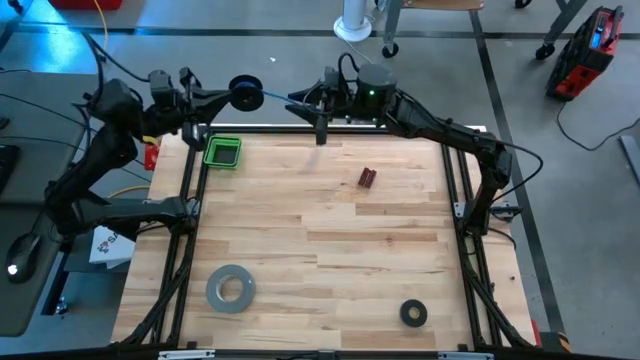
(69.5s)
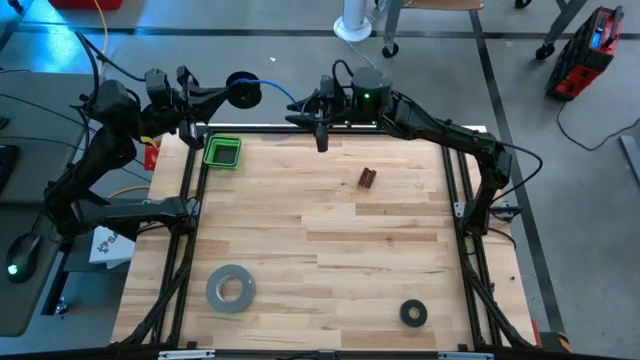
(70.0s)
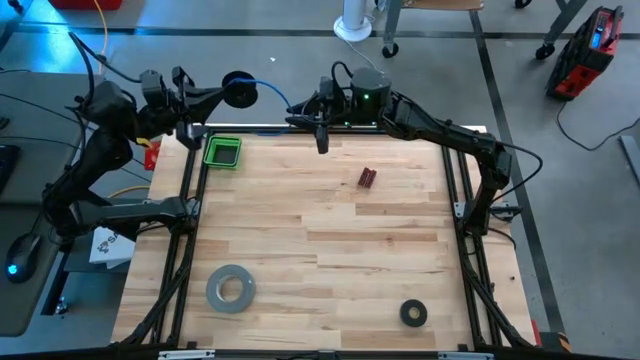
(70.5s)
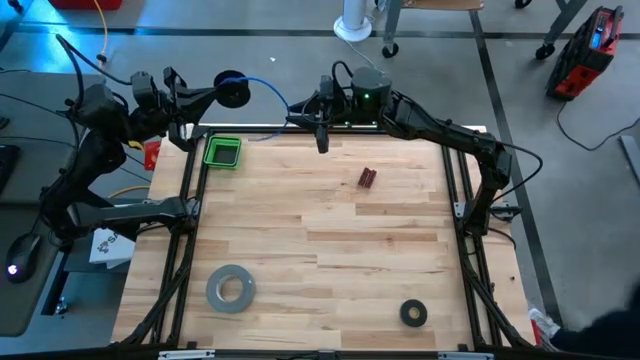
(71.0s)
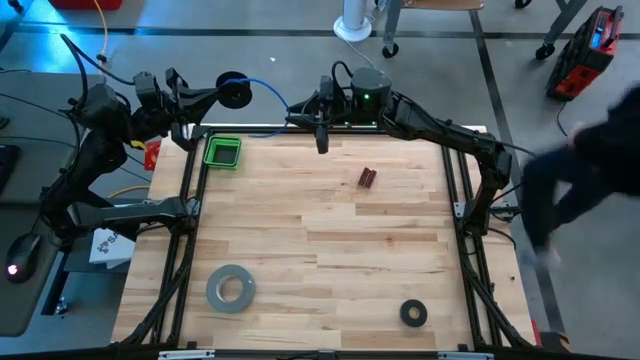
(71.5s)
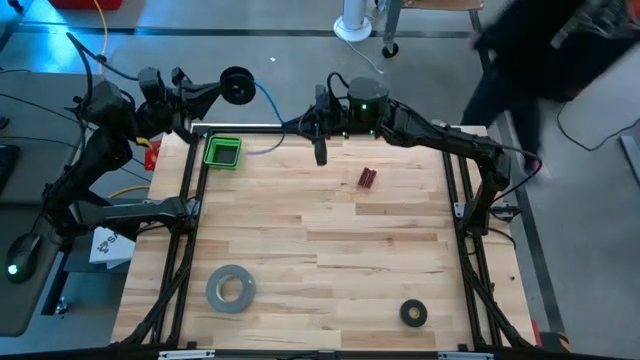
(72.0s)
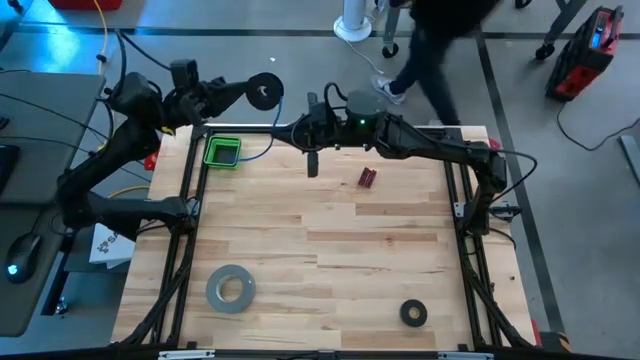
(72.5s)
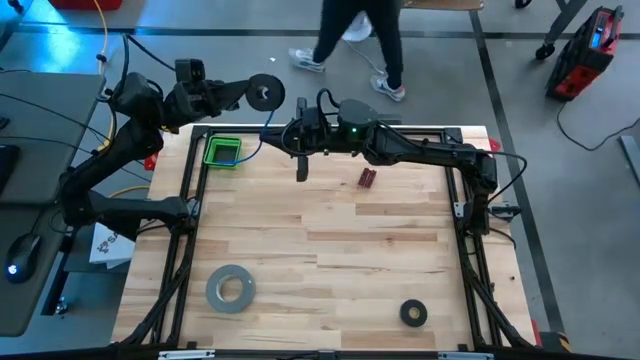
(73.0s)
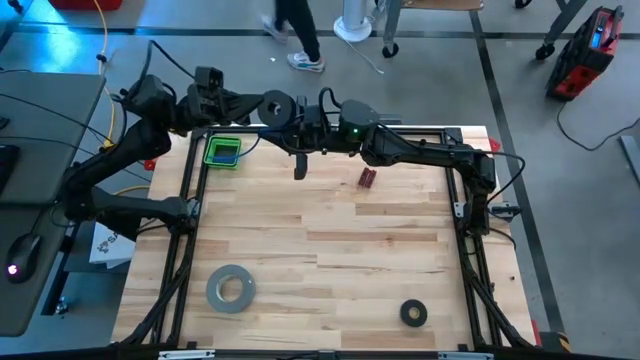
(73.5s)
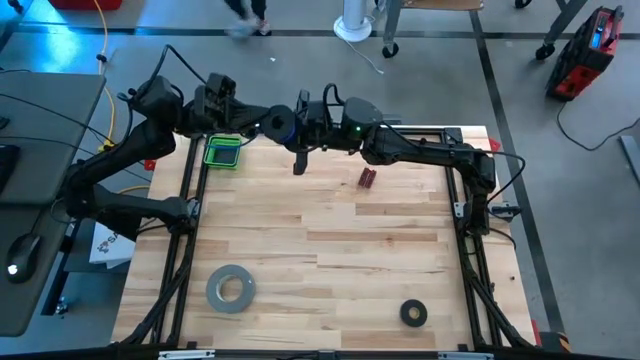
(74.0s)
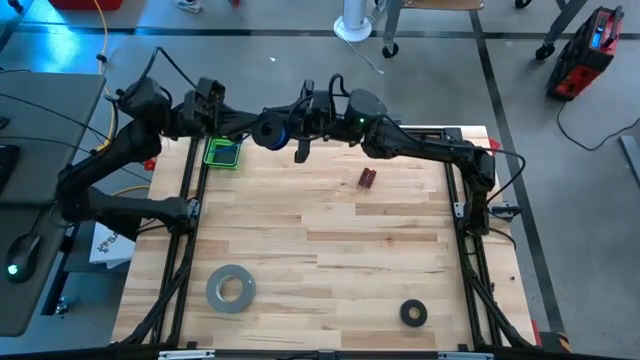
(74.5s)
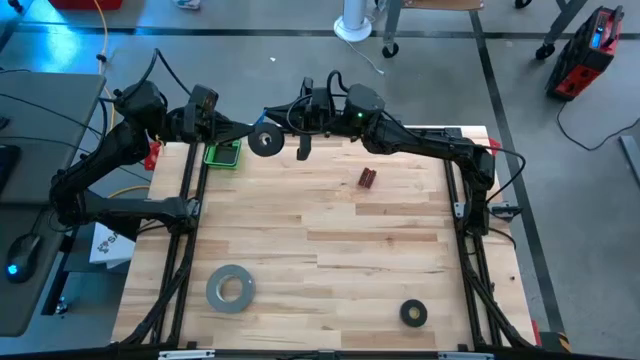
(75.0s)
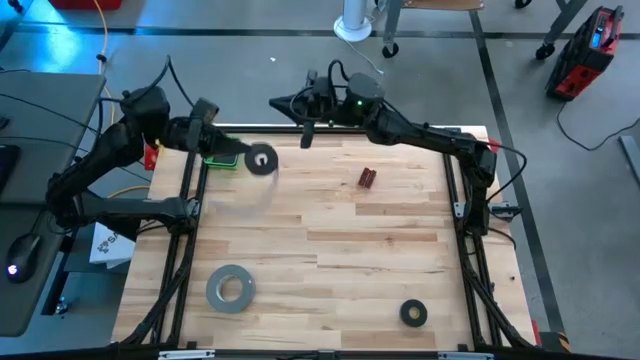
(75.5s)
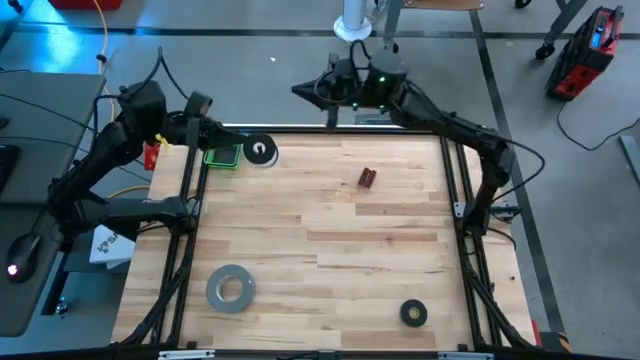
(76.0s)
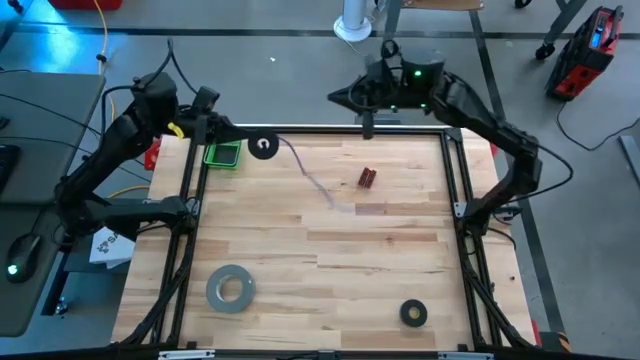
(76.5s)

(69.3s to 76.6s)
Task: Coil cords
Coil the blue wire onto the spool

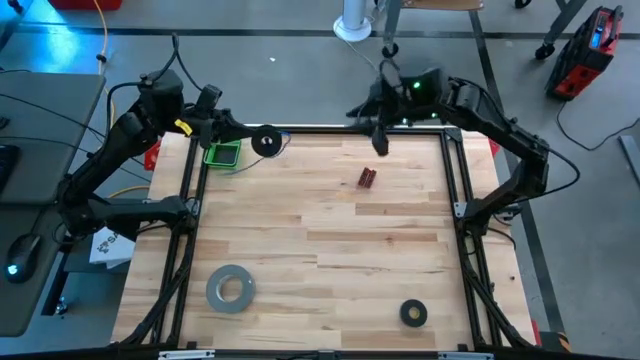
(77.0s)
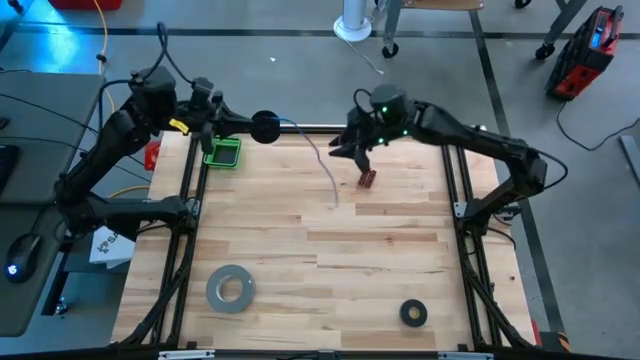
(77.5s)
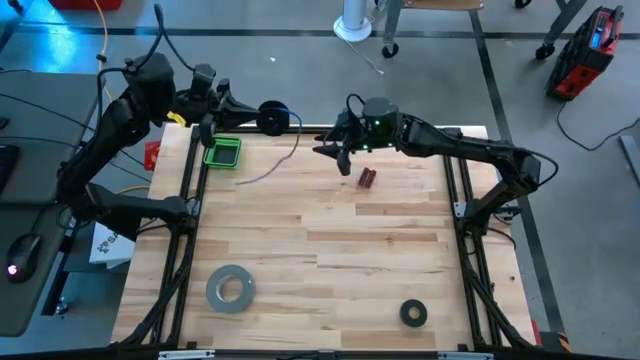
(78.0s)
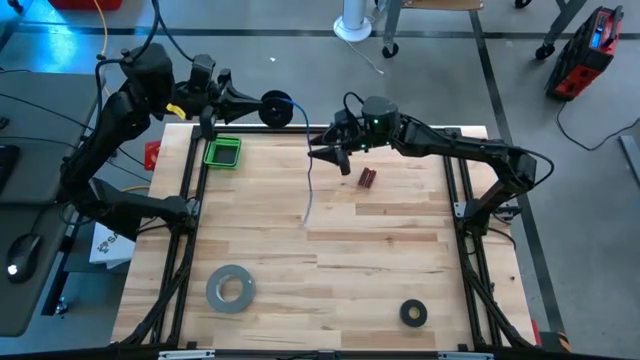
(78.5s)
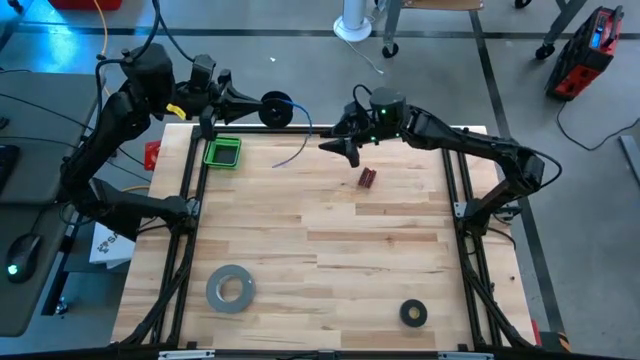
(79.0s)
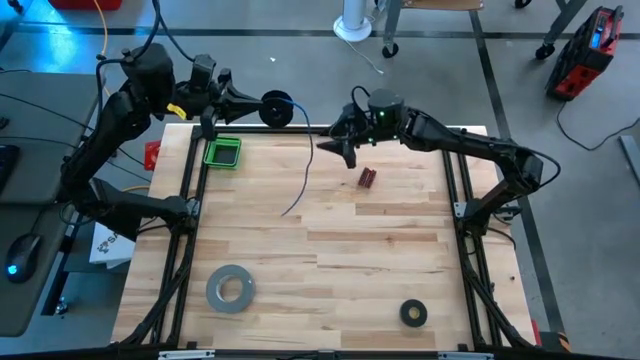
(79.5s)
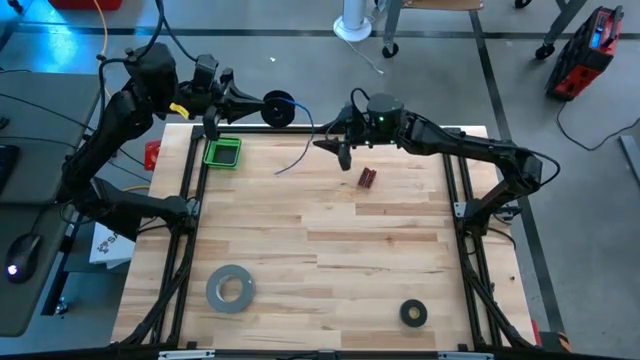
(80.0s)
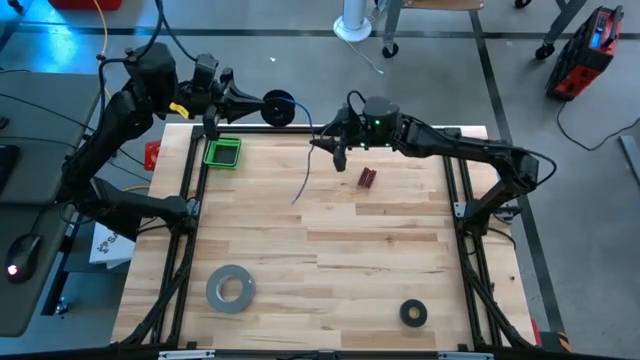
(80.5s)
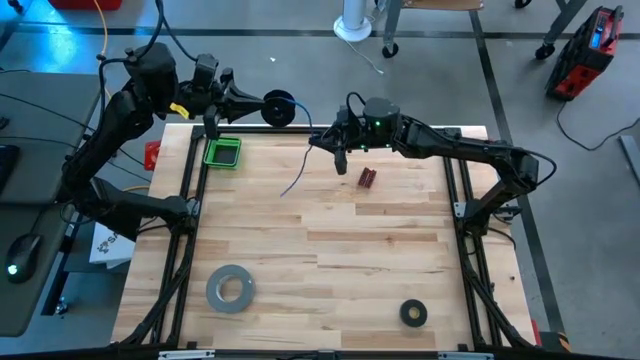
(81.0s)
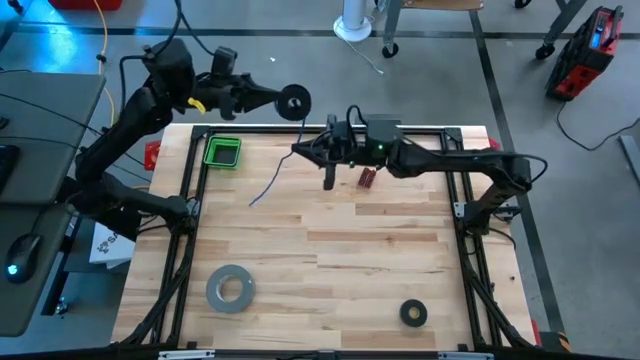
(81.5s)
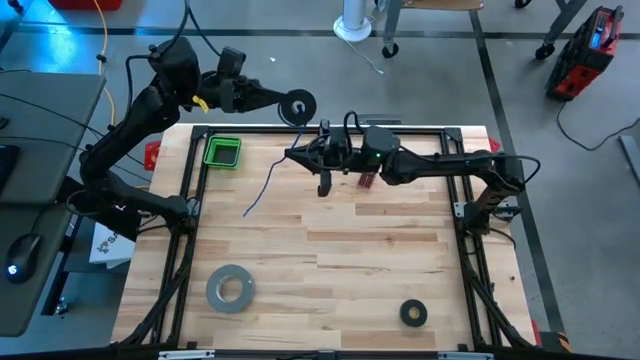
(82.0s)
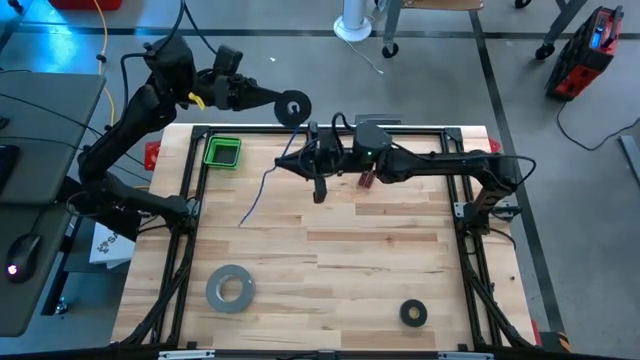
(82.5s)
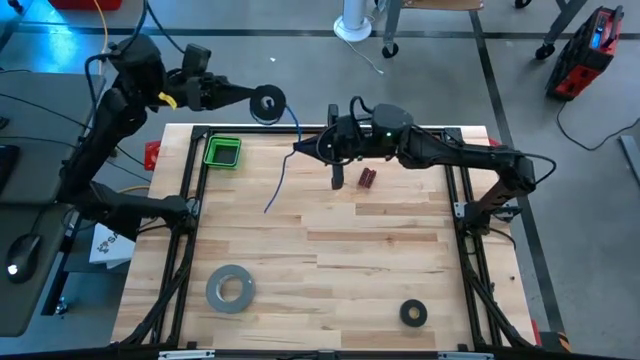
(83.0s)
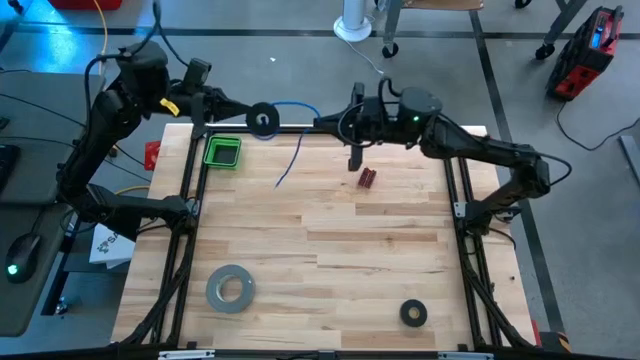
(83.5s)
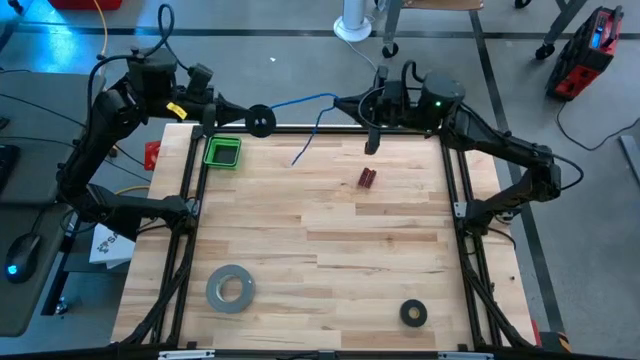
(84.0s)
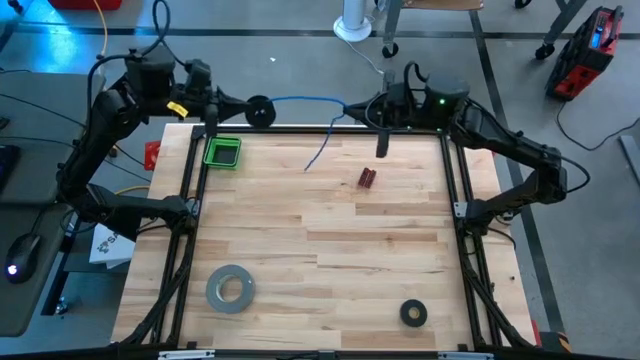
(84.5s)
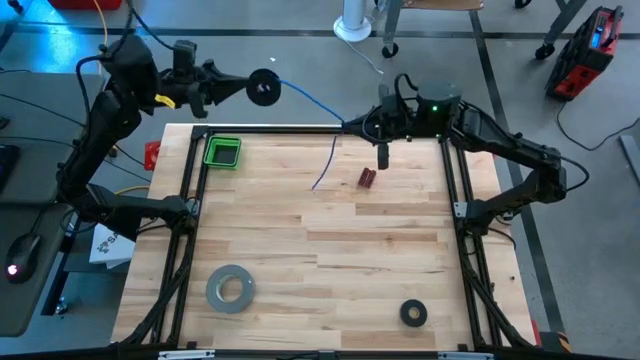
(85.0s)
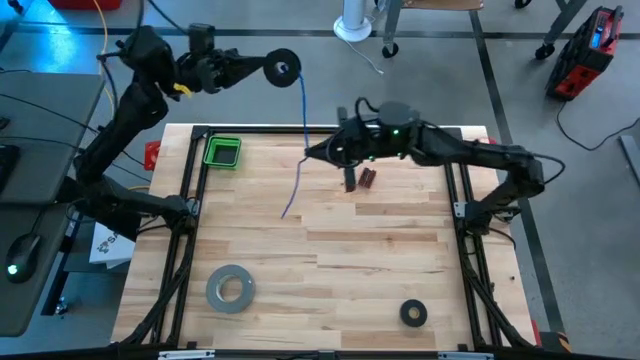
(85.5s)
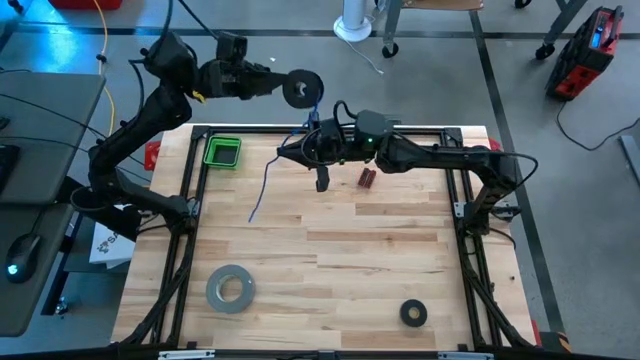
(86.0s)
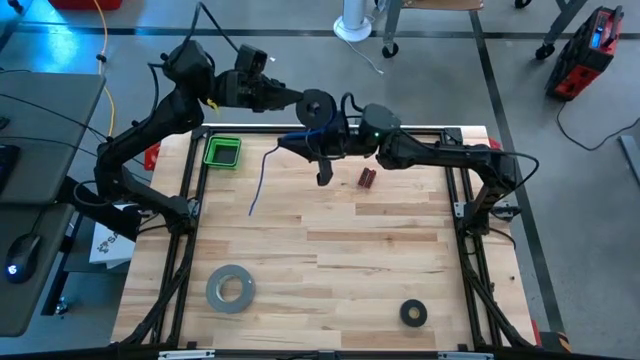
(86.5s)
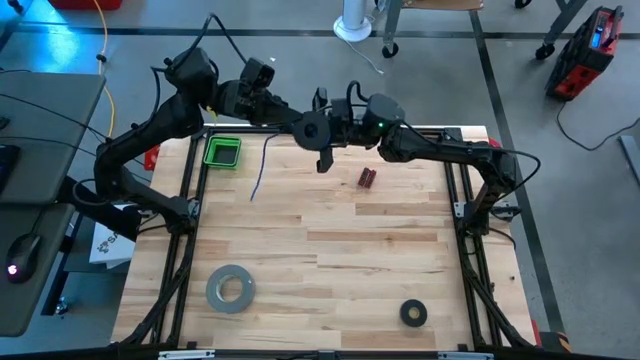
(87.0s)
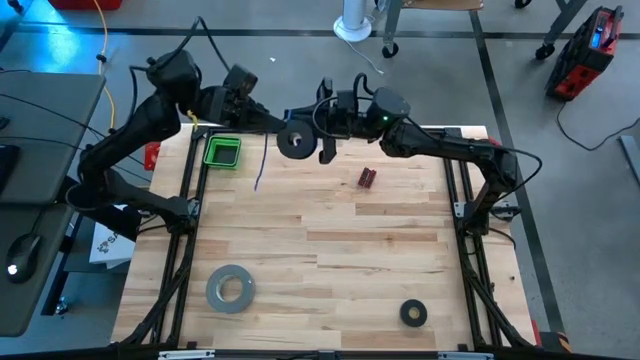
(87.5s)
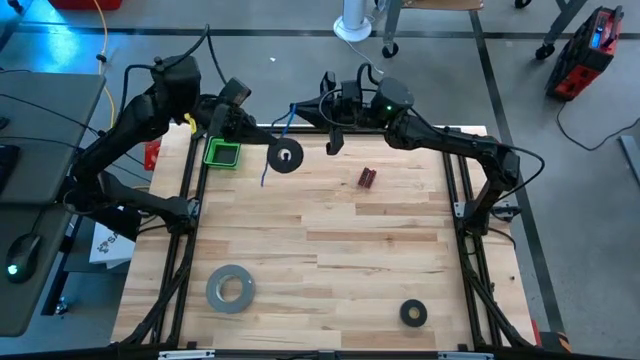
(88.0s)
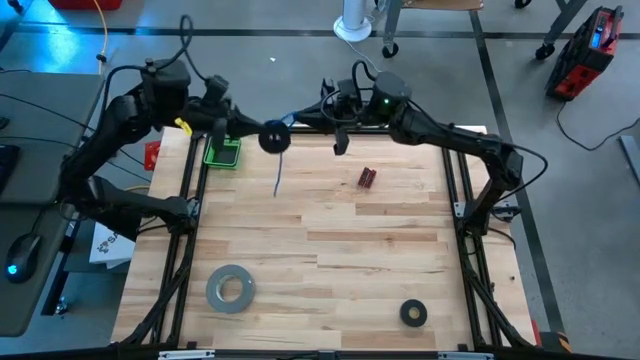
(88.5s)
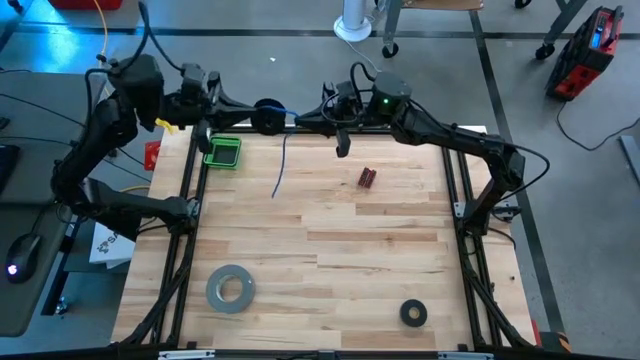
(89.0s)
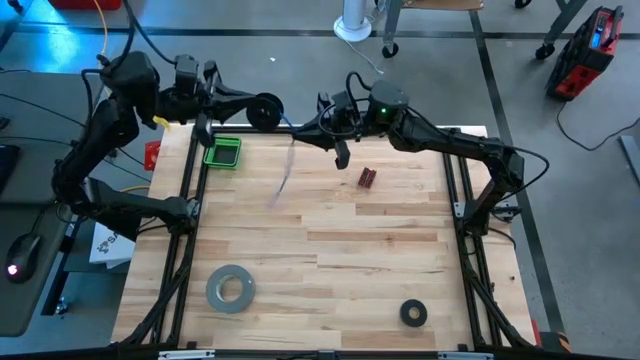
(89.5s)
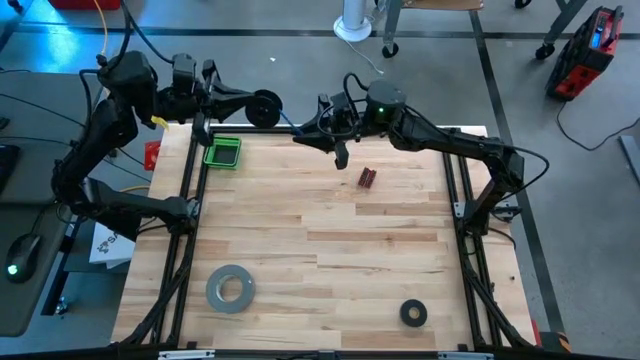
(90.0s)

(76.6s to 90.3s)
Coil the blue wire onto the spool

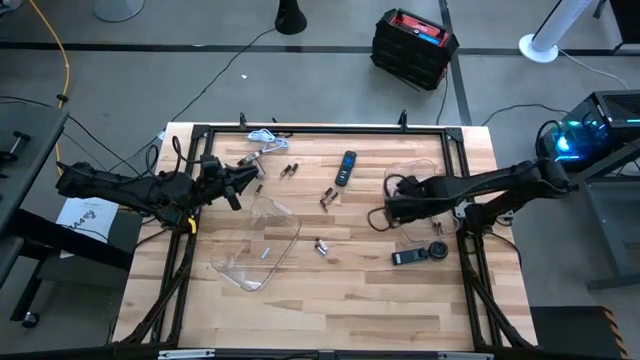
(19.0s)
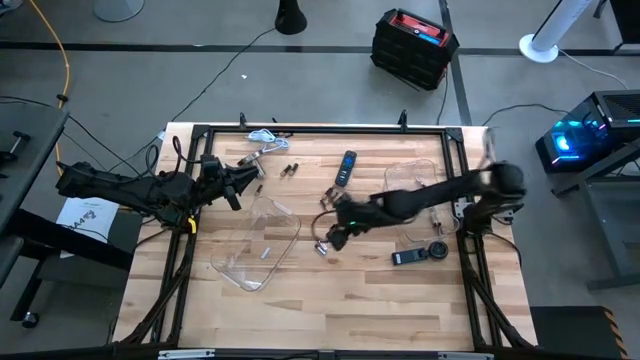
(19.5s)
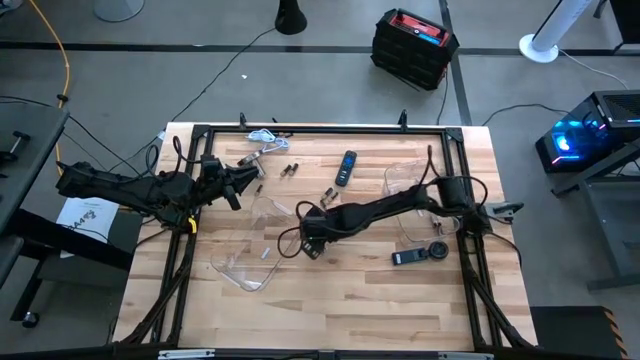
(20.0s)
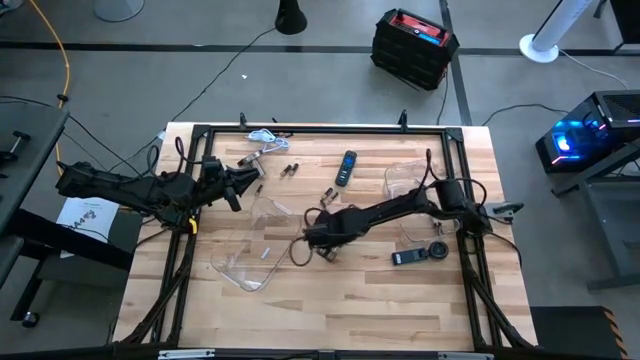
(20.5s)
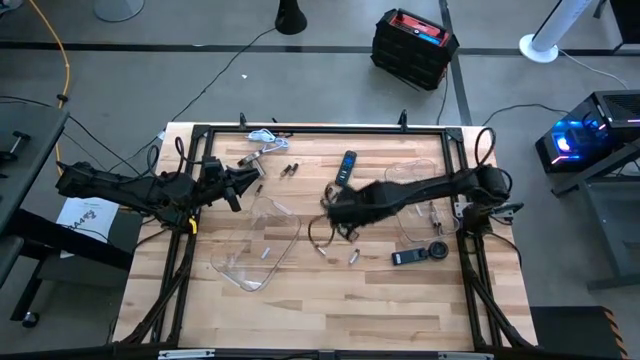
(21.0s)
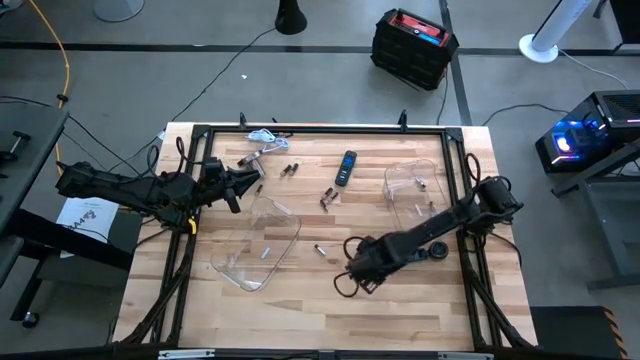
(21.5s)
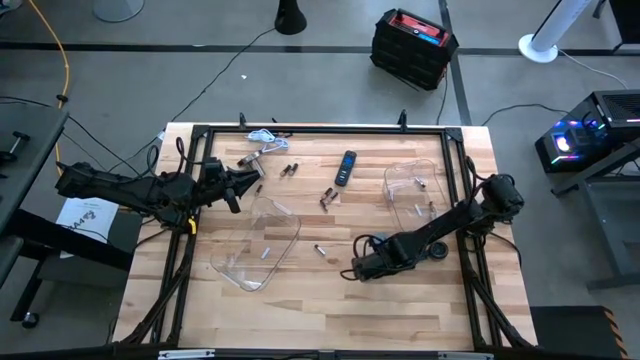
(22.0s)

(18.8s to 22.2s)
Task: Sort batteries
Put the white battery into the right transparent bin
